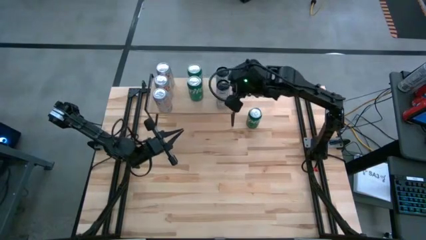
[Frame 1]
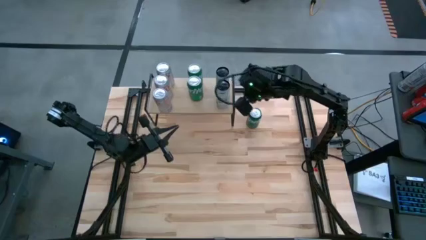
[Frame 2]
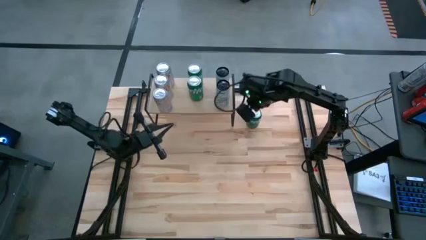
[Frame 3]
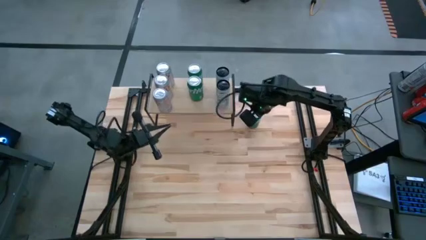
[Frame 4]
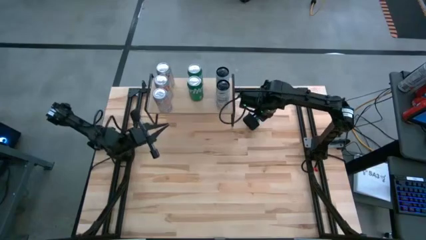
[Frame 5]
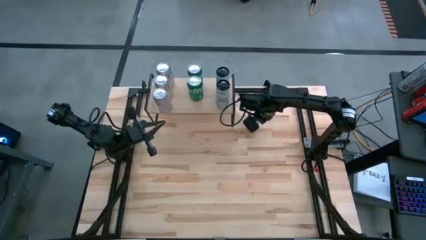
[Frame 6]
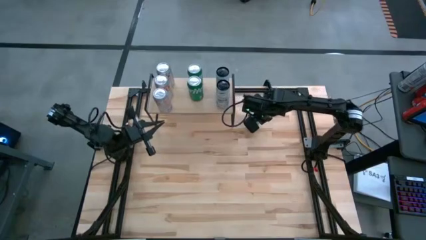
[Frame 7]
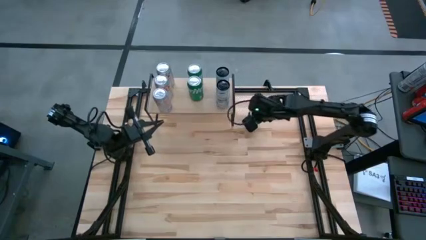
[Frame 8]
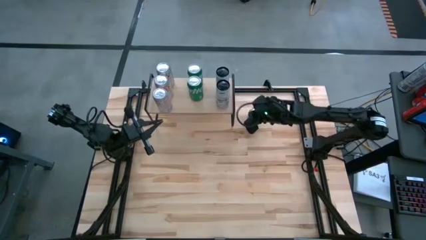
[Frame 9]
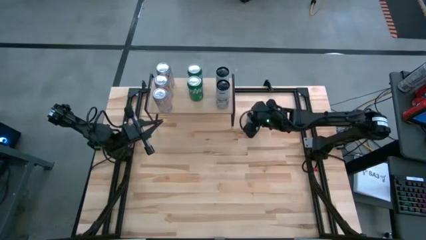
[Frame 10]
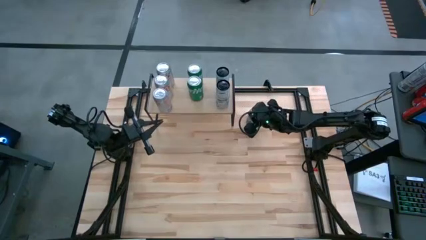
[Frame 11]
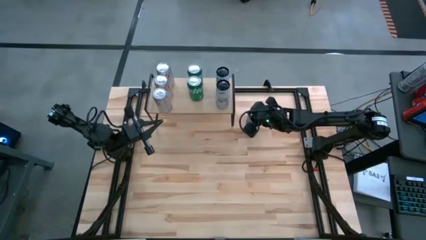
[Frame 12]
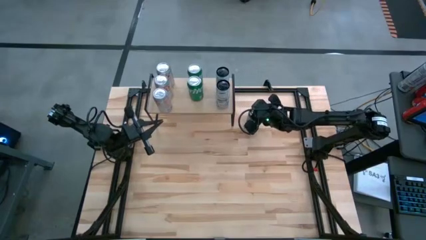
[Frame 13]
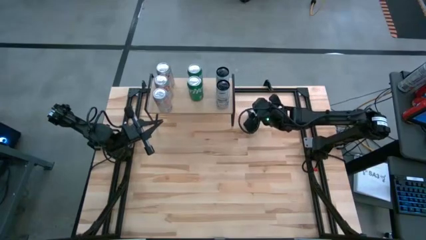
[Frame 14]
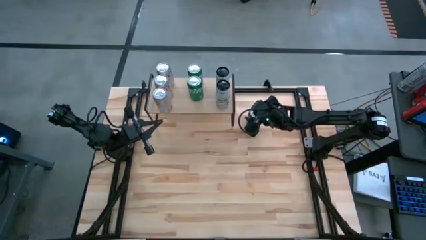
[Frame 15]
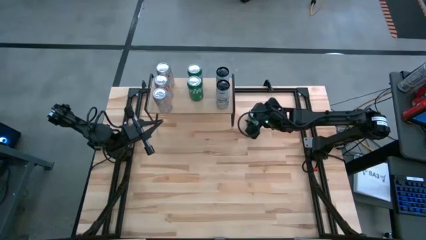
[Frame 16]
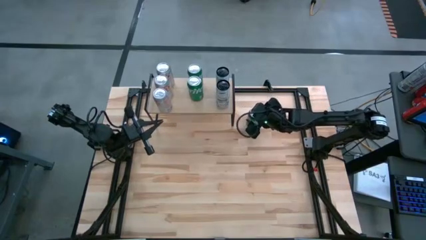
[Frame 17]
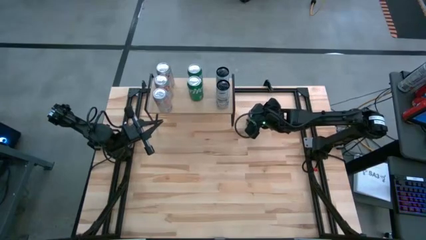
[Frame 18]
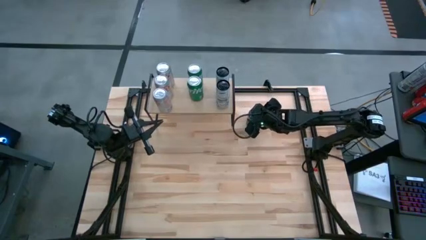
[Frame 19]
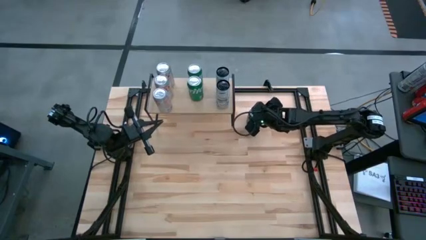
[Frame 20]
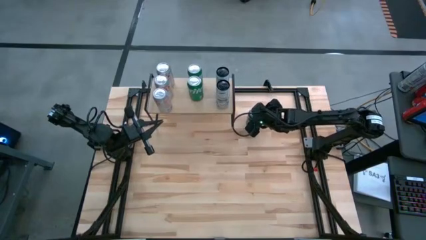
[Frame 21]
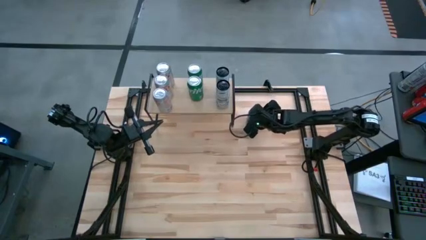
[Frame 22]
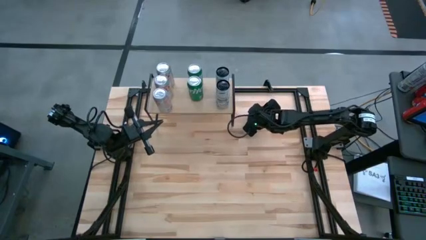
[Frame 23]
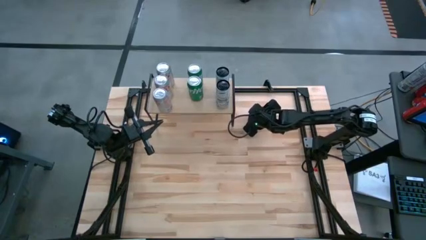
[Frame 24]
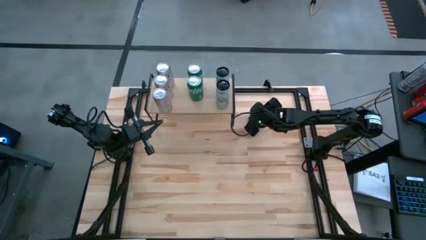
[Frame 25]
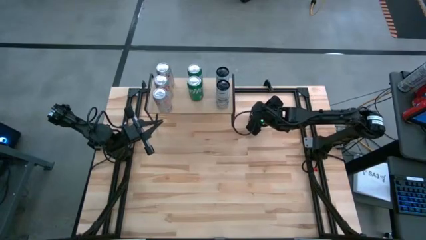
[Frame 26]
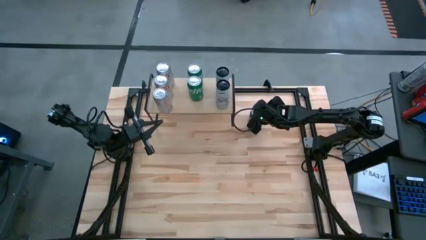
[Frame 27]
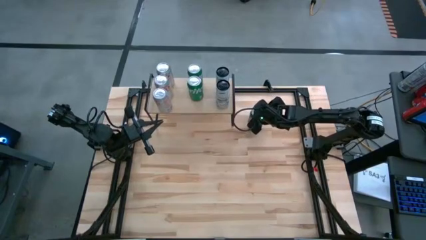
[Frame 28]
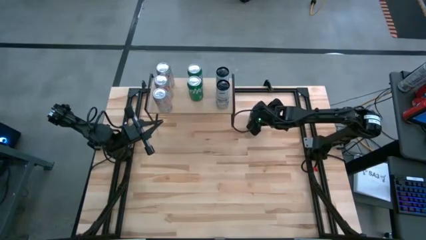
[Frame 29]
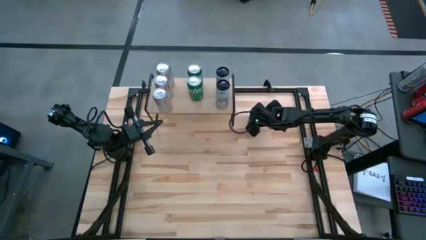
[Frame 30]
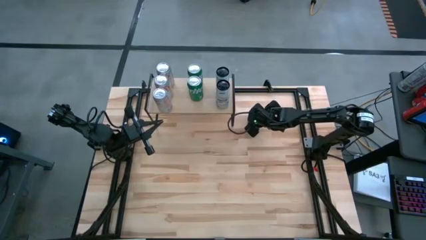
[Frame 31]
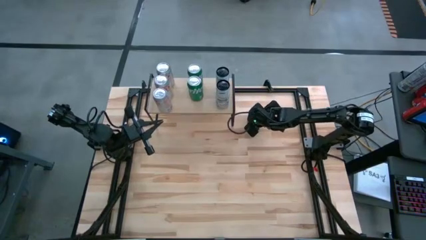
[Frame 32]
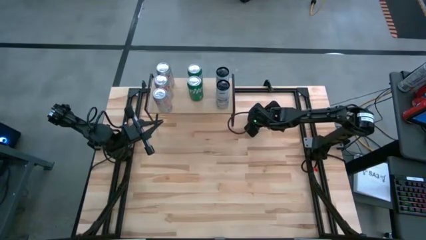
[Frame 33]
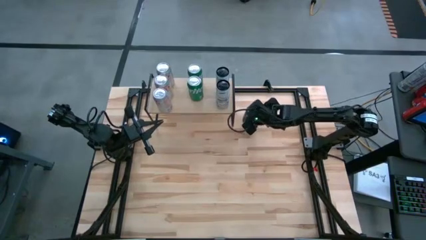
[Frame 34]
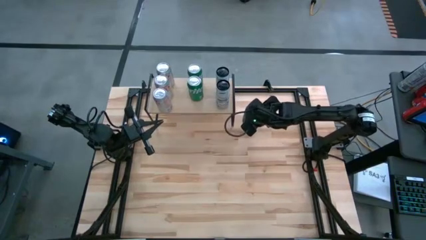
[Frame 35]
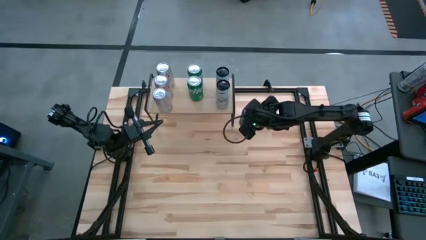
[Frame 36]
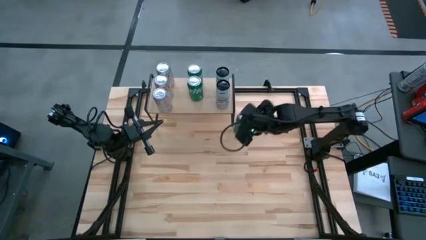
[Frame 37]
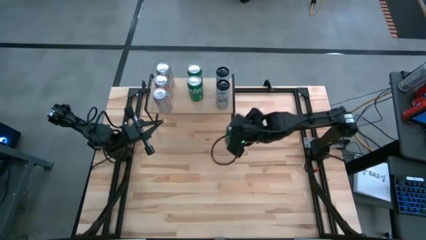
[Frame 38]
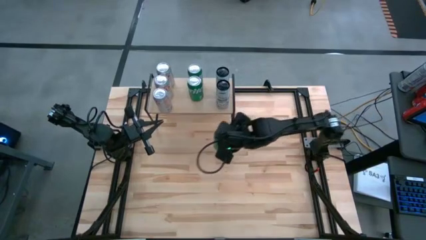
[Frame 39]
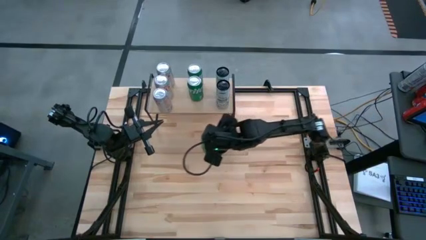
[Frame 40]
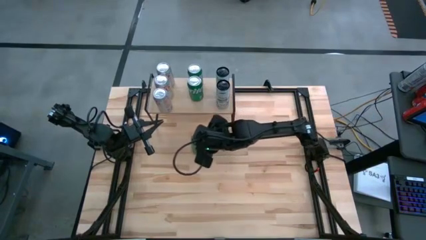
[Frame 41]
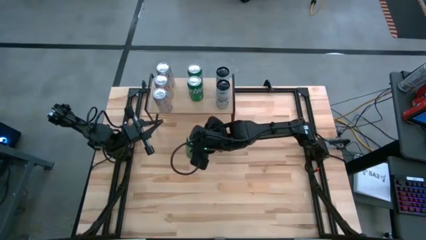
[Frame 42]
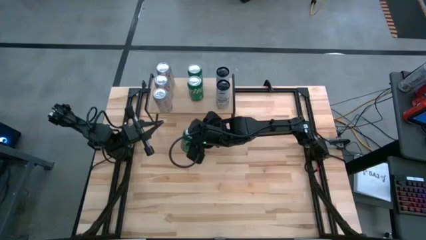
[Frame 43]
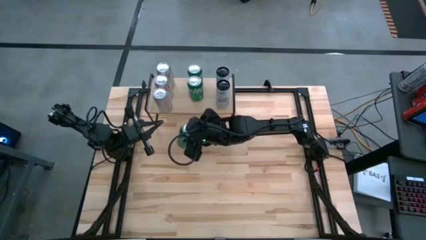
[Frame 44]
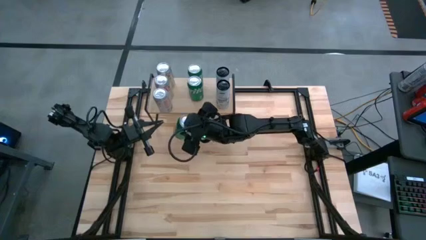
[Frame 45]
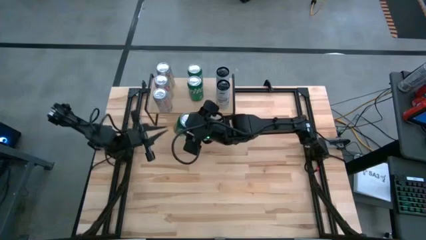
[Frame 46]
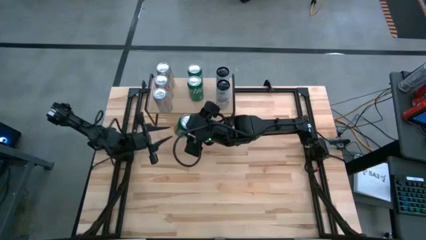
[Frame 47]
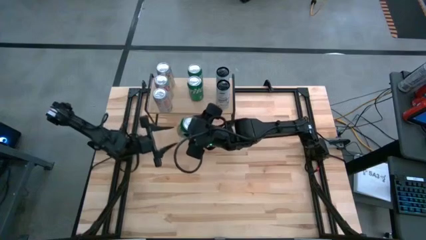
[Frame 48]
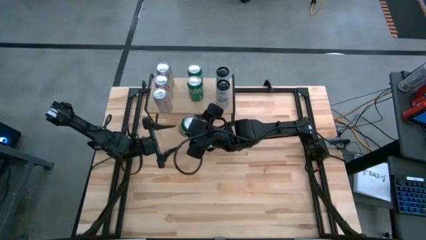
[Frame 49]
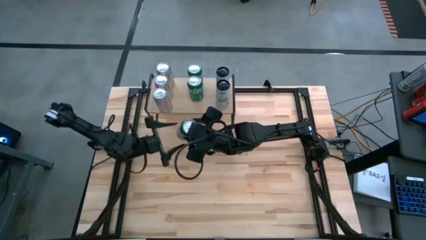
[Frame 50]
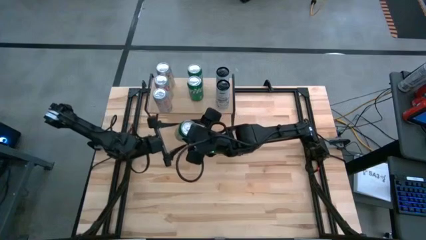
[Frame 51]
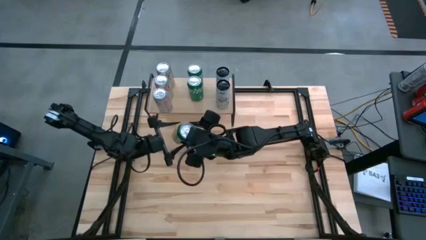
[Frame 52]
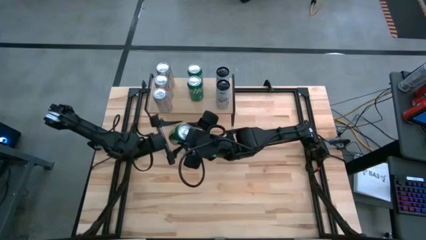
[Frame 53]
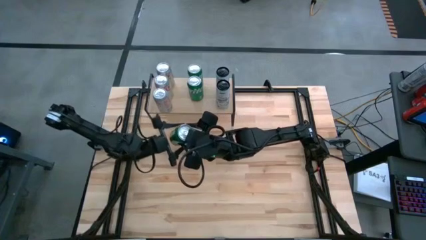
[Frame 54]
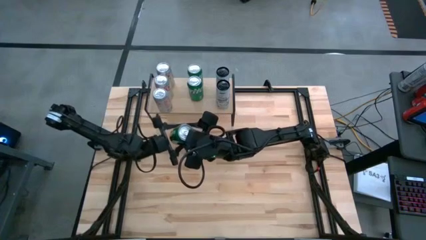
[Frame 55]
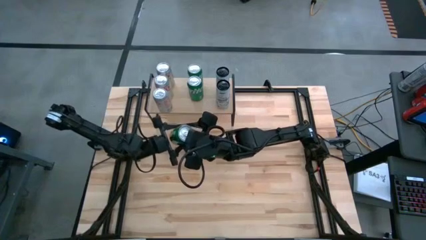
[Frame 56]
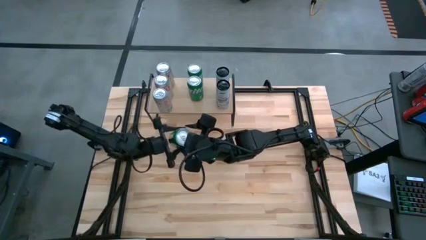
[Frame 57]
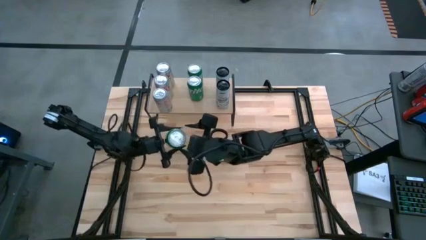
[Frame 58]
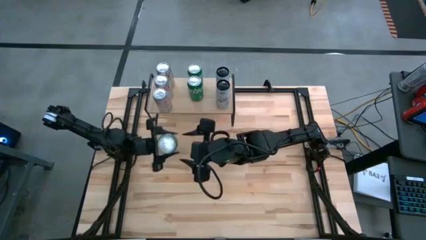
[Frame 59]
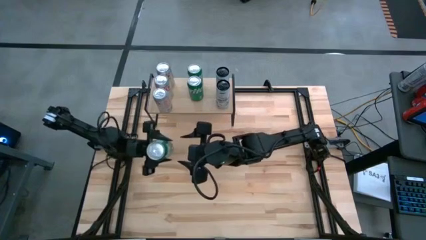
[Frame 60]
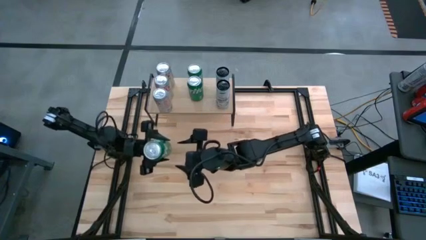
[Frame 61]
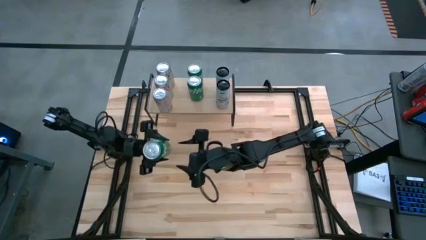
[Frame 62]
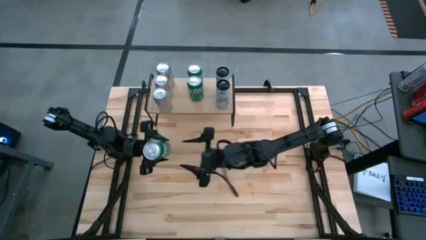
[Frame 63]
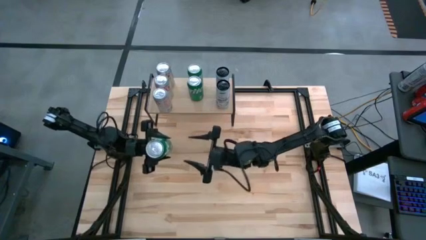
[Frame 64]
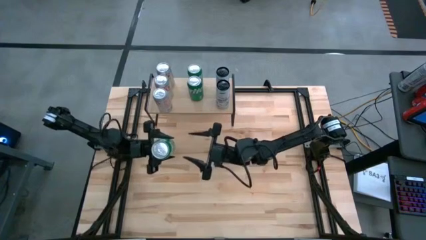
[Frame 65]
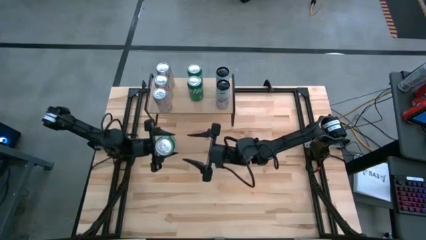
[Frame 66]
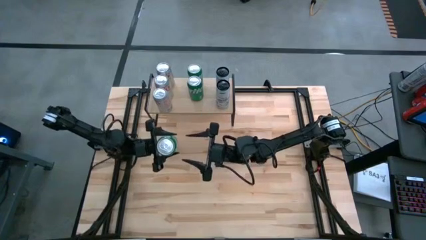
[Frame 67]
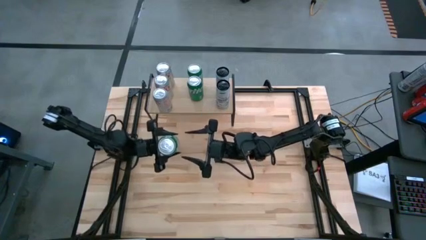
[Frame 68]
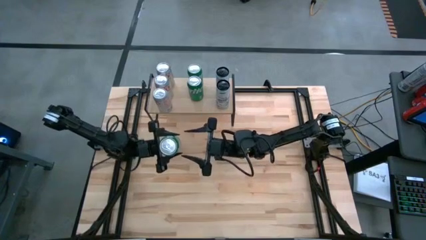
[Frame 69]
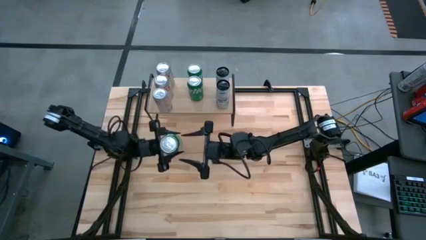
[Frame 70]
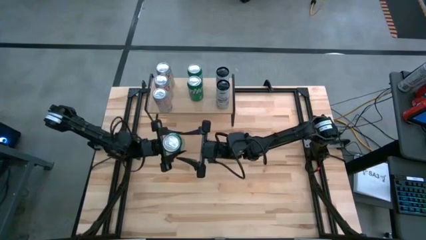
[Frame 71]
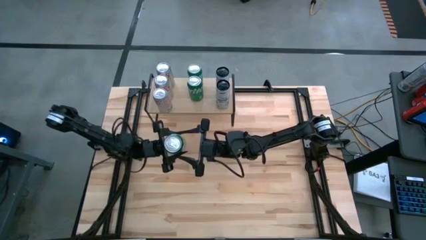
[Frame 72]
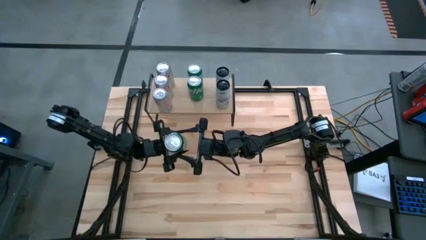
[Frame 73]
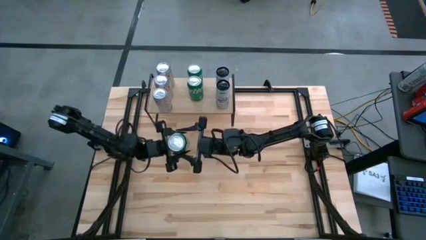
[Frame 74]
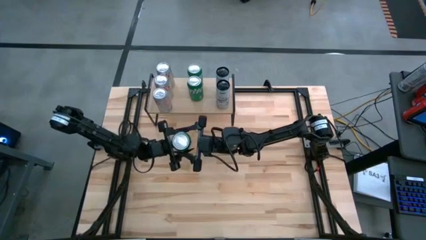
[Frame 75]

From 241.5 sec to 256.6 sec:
Task: Place canned beverage on shelf
Put the green soda can aligned with the other green soda cans on the shelf

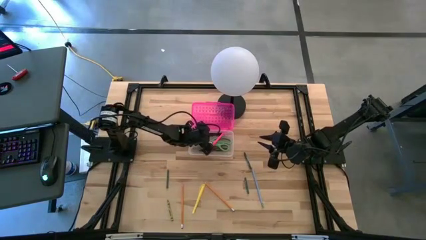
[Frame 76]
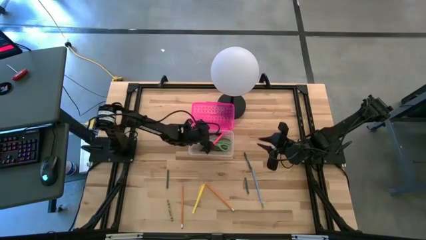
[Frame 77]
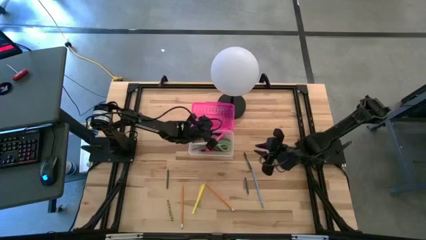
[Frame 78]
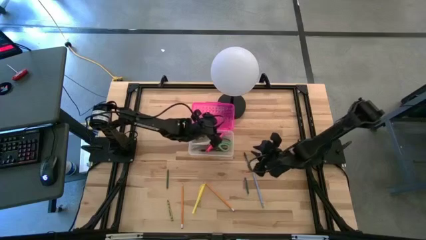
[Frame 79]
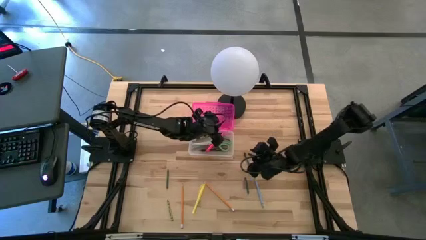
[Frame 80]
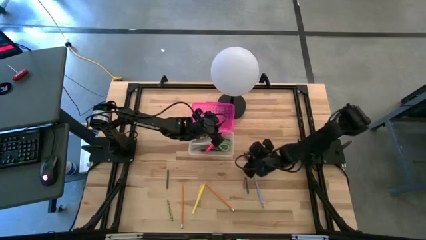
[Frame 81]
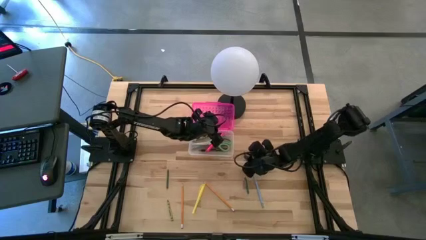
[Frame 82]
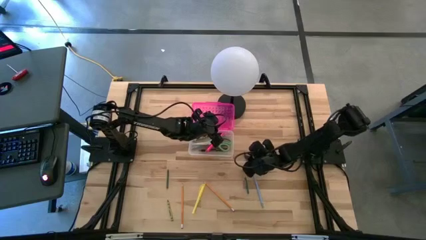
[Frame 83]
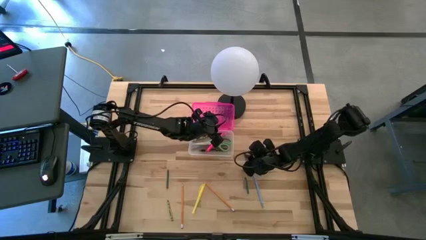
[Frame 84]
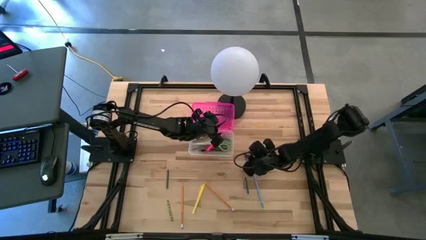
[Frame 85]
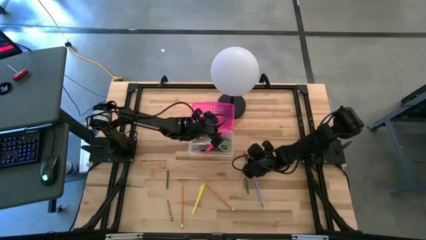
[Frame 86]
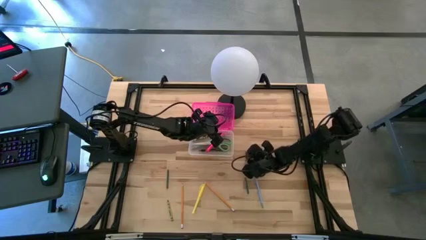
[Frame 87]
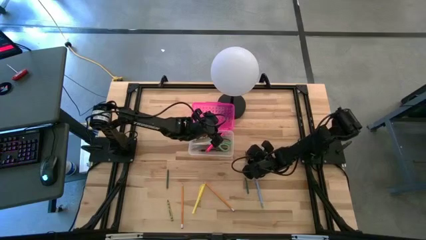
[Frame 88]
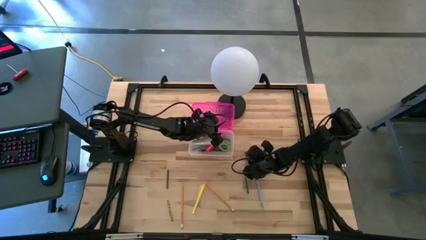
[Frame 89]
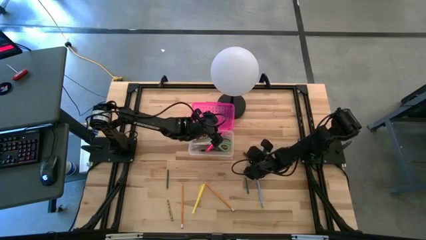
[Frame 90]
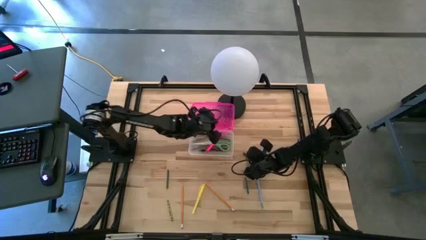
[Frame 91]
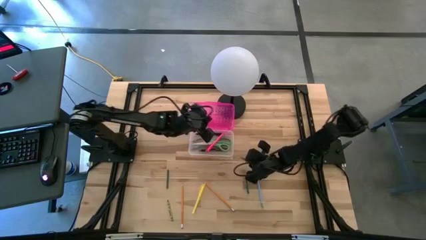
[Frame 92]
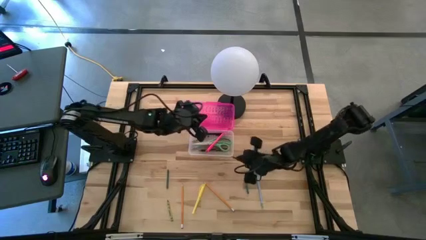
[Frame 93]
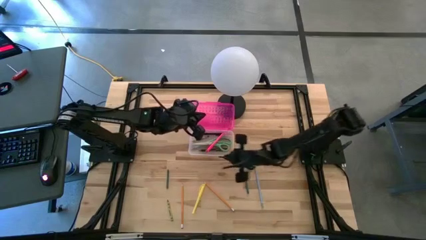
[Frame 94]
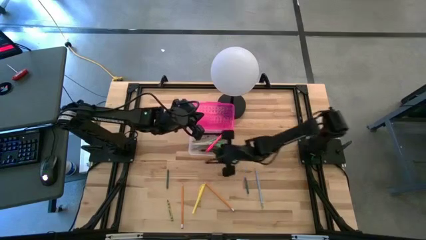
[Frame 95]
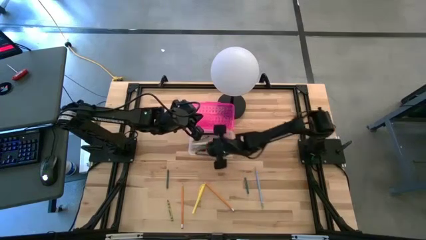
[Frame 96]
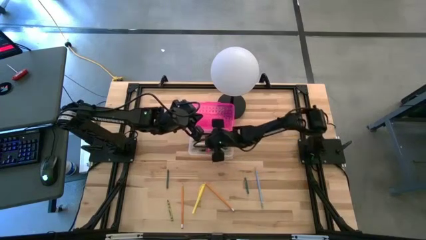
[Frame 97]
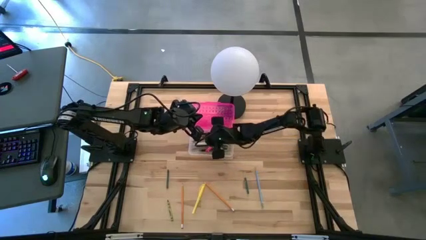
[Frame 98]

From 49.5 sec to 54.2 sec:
Task: Pick & place school supplies into a supply box
Put the top dark green crayon into the pink supply box
